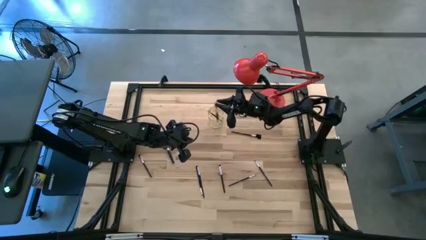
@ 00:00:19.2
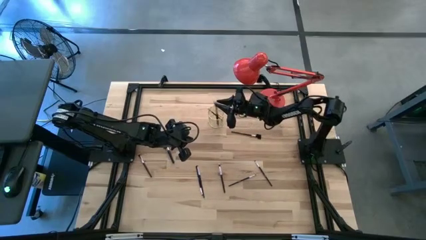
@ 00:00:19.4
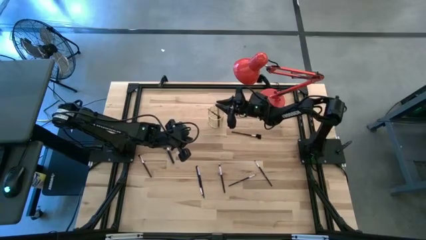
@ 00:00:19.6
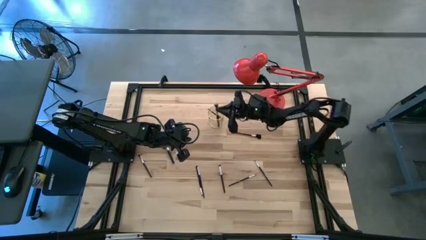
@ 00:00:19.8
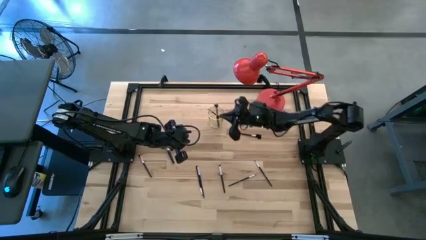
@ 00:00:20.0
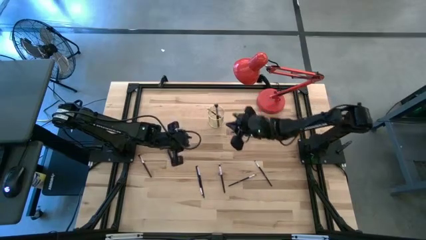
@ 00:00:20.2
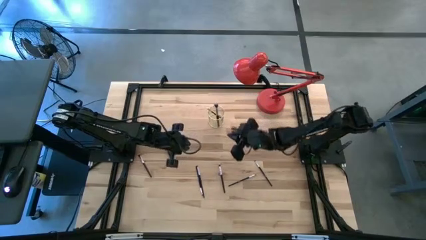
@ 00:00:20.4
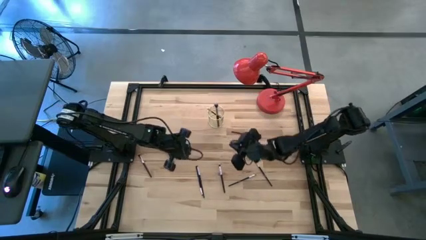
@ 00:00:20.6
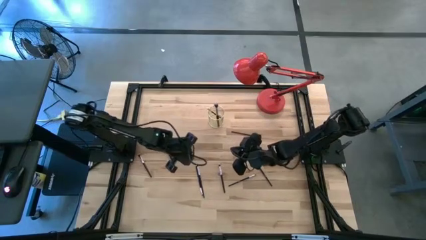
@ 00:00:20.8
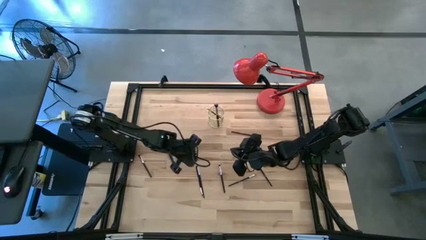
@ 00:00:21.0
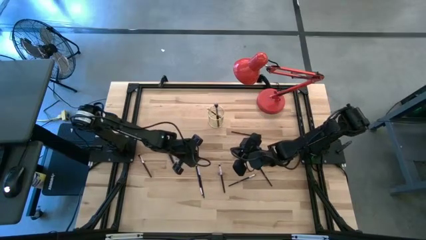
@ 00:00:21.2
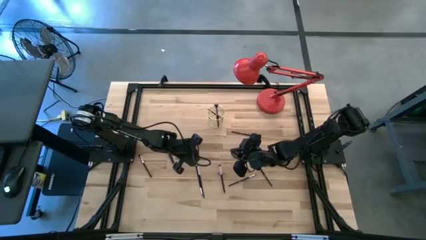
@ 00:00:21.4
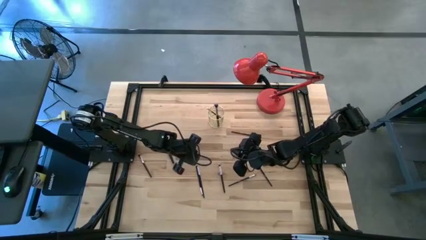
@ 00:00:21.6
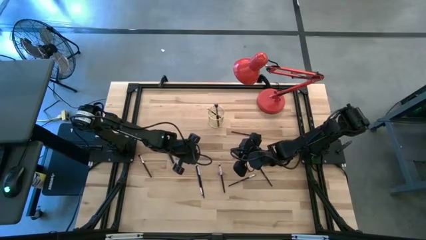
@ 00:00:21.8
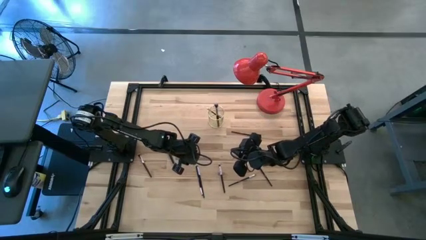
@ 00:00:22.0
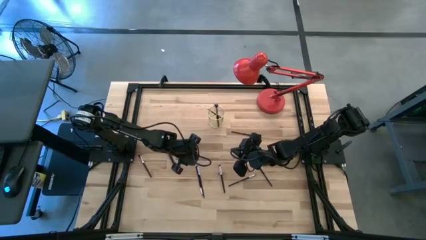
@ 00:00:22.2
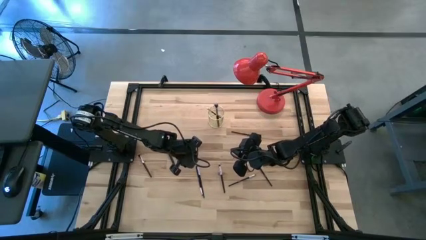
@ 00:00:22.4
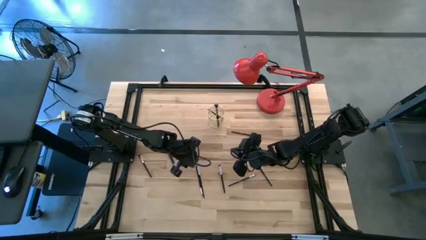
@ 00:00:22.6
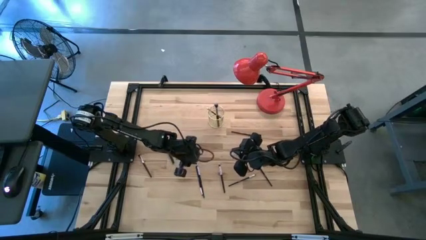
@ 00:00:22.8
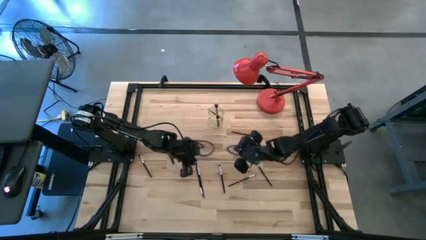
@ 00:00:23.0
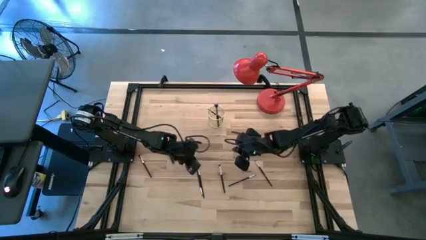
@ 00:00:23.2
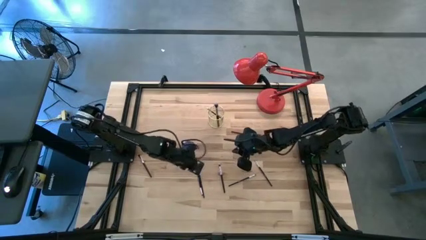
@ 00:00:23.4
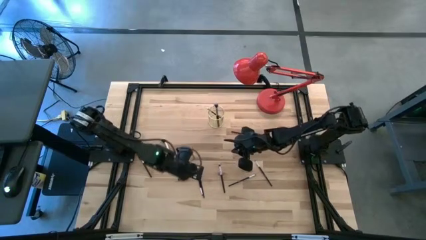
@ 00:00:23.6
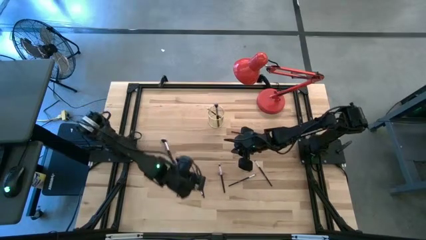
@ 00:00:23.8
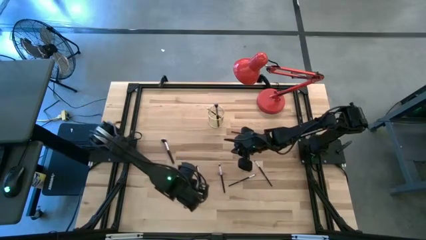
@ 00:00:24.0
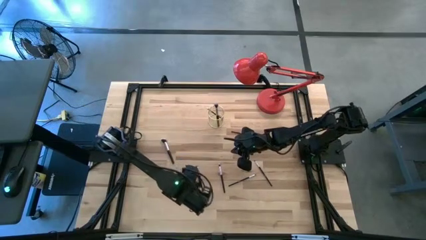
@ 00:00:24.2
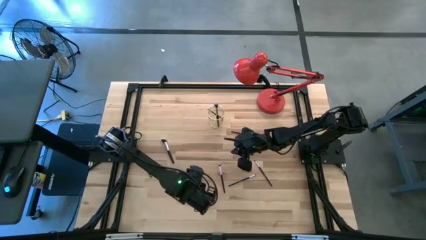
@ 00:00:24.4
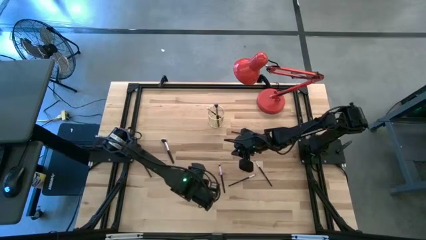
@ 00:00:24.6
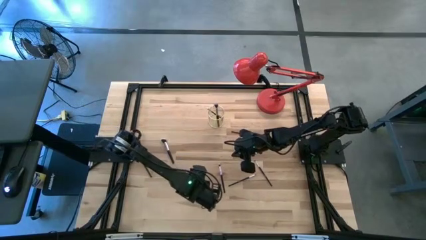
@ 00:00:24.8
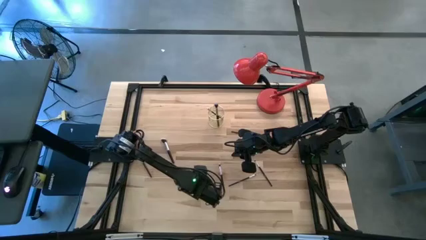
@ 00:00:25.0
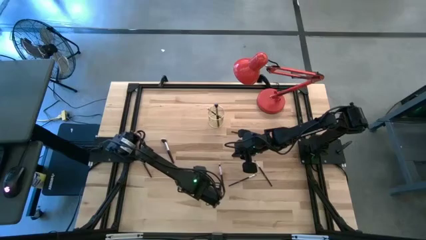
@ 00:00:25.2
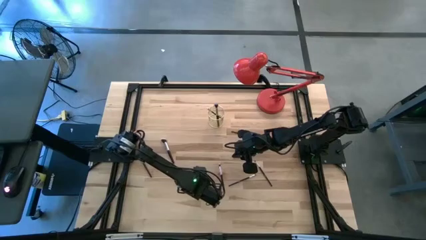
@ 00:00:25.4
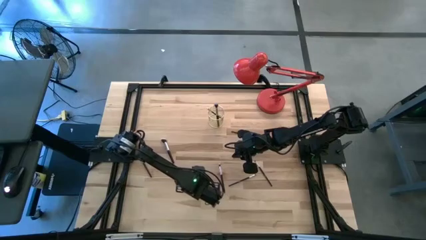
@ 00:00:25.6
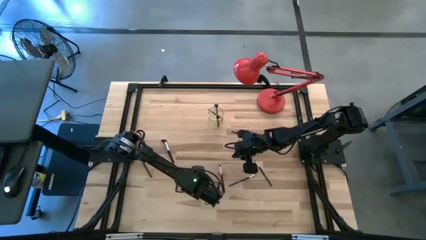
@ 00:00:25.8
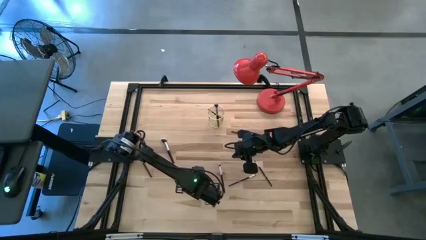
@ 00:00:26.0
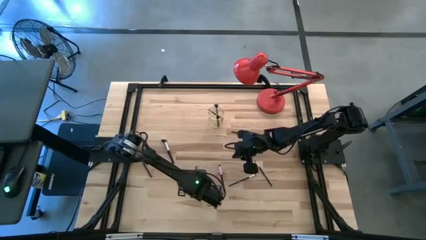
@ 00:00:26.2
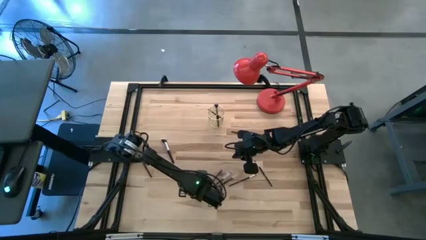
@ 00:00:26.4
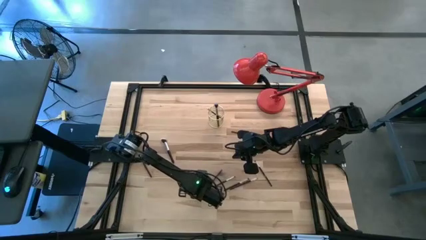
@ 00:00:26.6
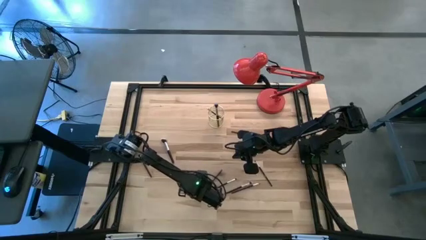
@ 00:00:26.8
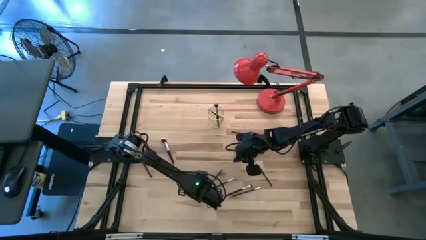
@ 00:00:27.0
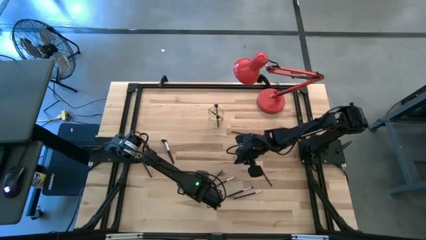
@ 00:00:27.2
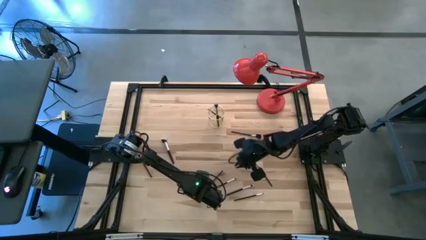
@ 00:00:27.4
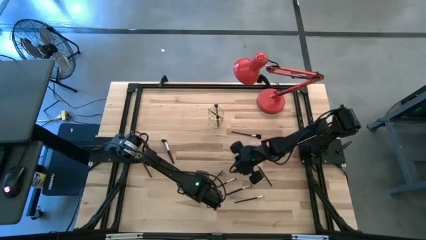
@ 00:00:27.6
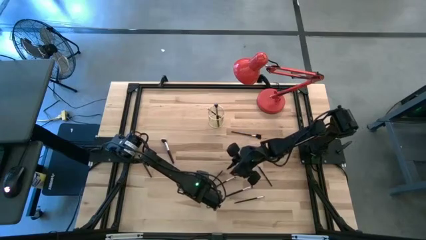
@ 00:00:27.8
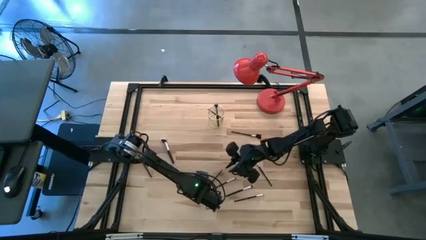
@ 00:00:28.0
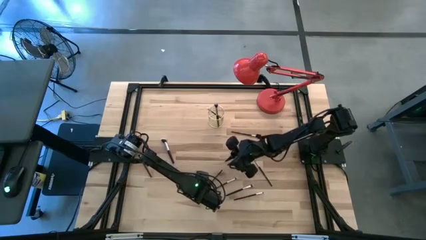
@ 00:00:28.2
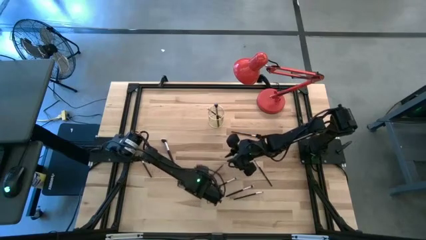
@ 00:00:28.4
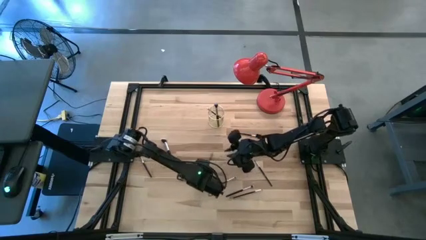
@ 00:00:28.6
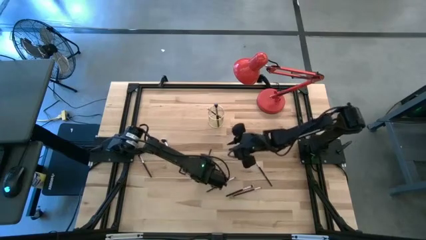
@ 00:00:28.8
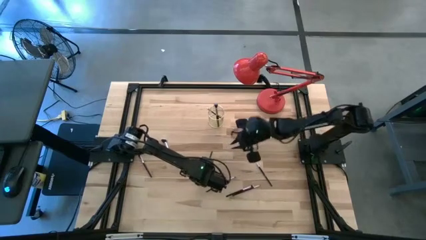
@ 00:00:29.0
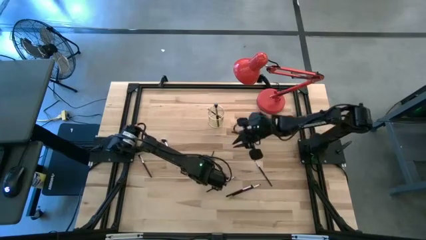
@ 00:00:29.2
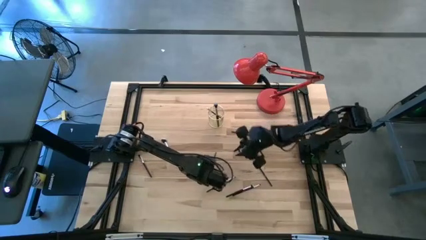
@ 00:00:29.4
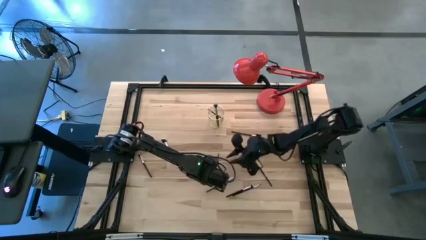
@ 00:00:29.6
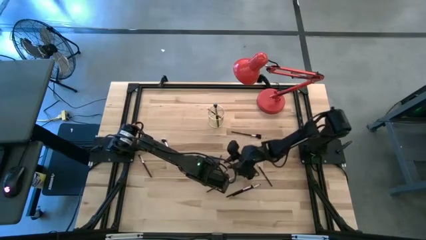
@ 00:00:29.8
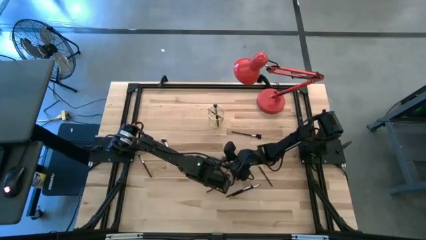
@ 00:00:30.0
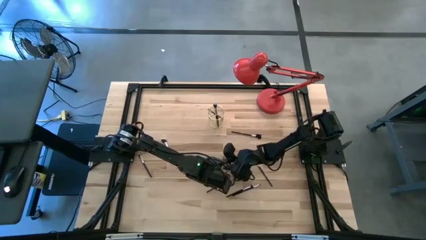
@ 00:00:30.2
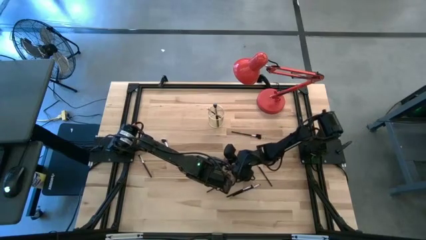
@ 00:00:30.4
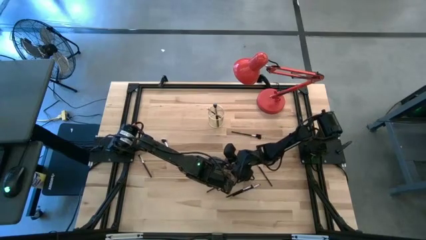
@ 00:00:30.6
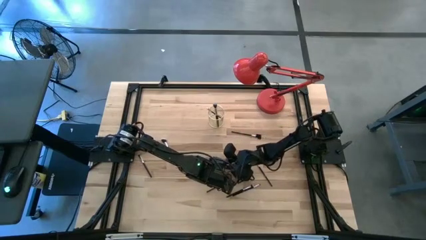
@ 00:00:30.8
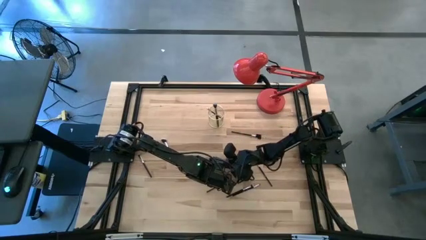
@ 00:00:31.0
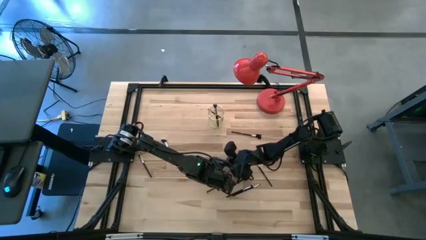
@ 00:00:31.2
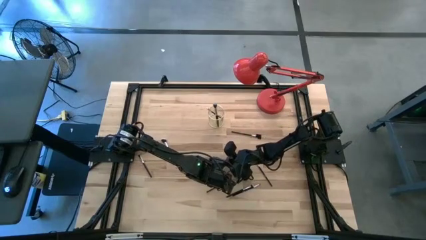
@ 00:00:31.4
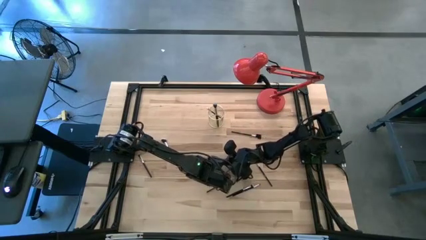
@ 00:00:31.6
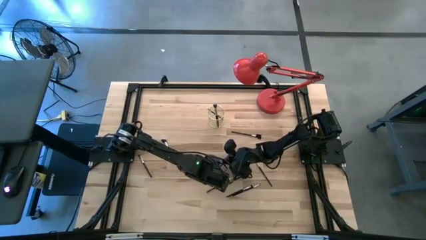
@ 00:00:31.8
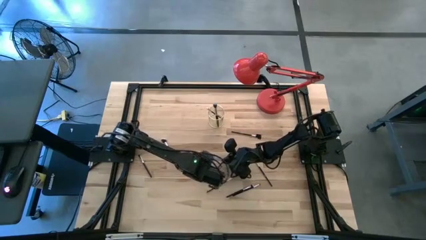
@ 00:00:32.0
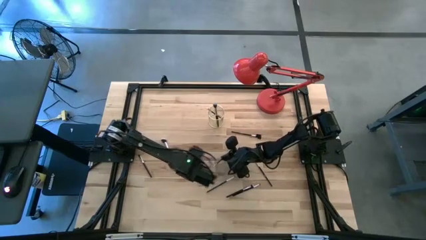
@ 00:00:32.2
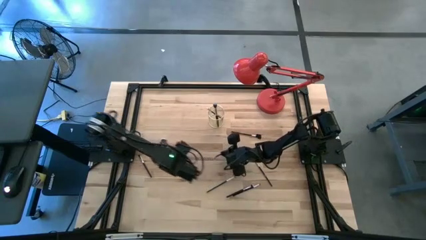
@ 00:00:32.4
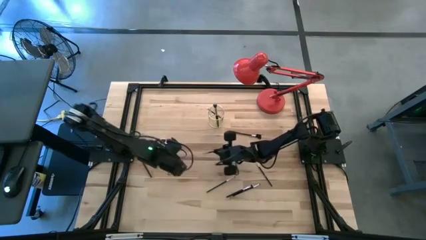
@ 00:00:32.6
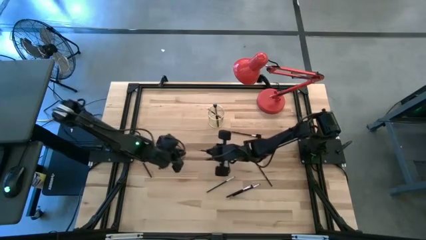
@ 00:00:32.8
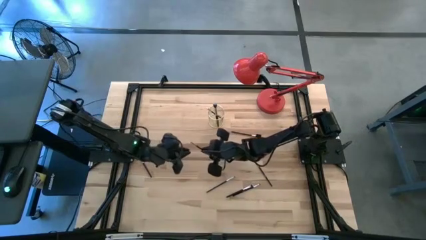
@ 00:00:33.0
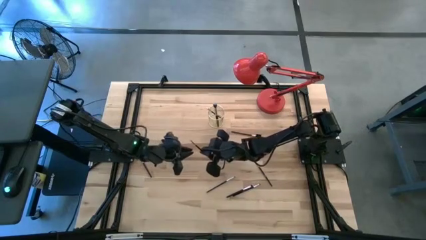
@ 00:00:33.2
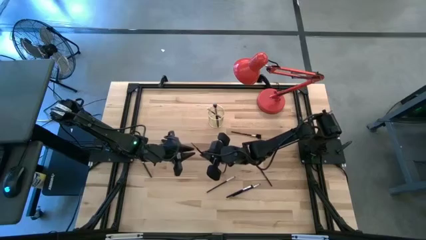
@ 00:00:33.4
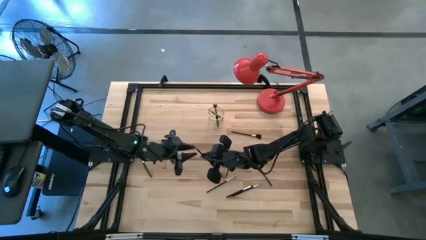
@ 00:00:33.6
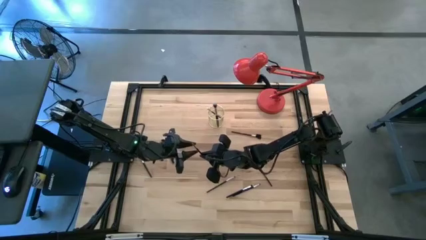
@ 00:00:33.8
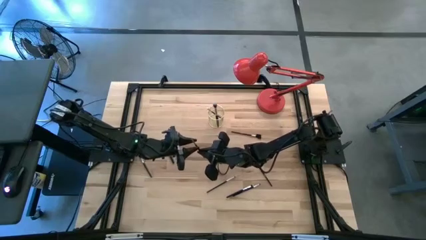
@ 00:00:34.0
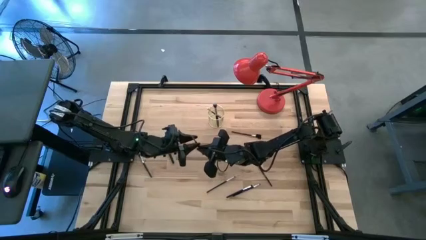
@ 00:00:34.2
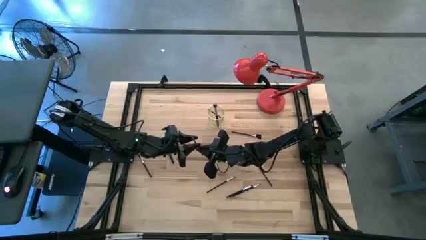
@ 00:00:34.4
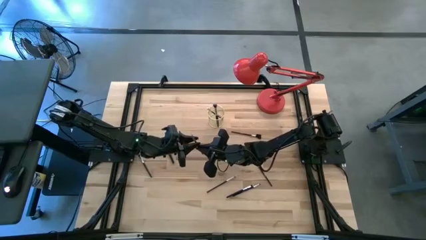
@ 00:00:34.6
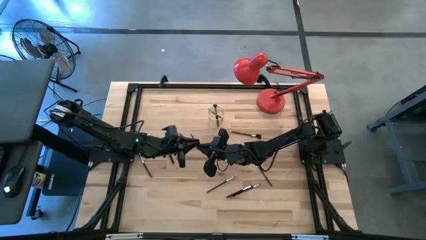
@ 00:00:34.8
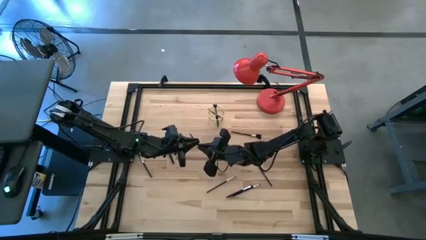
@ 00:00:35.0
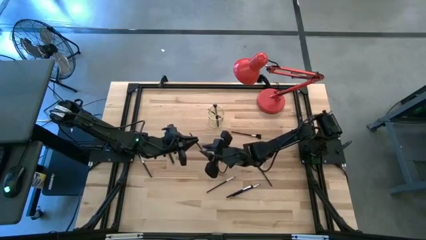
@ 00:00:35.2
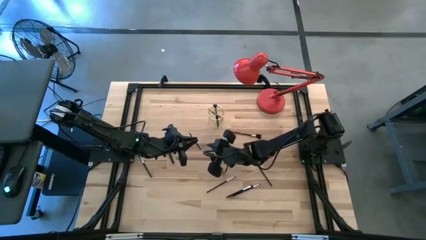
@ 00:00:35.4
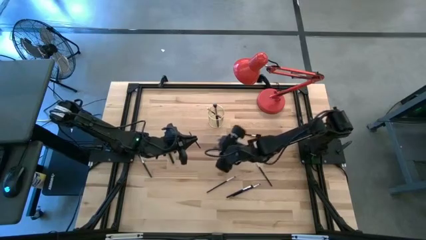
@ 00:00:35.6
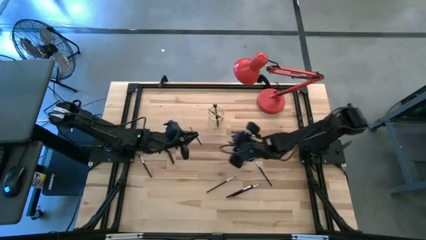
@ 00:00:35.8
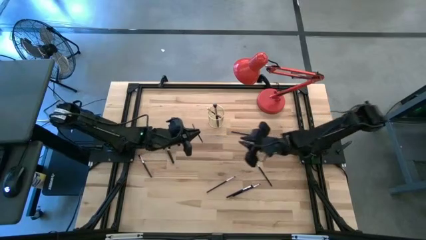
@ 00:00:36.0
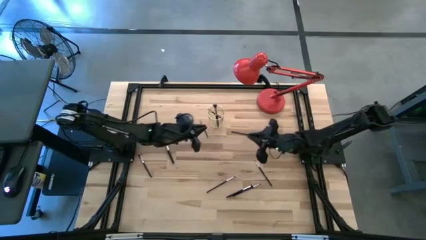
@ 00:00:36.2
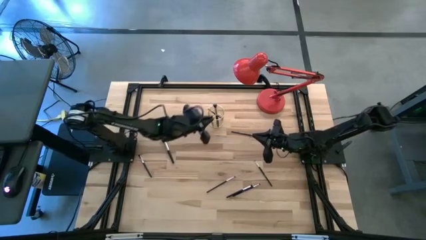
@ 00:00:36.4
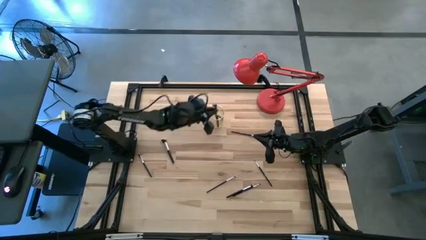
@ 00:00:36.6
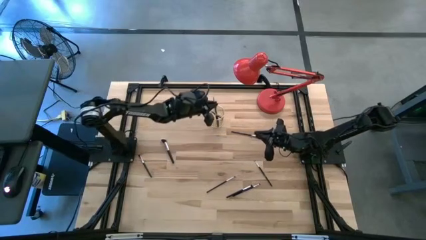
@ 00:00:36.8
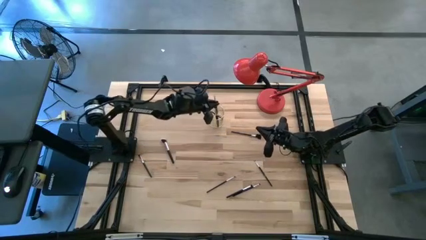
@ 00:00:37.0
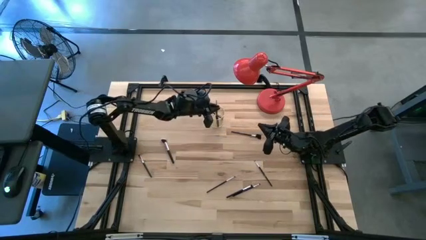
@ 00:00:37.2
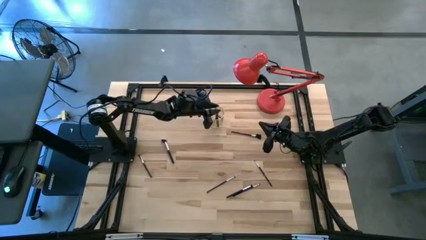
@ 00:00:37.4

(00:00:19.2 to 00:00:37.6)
Task: Pick & Place Makeup Brushes
Put the eyeshadow brush into the makeup brush holder
